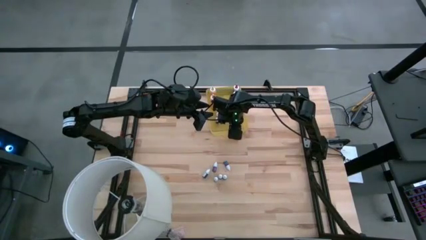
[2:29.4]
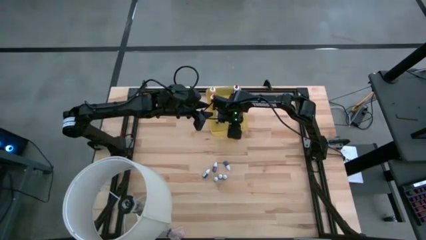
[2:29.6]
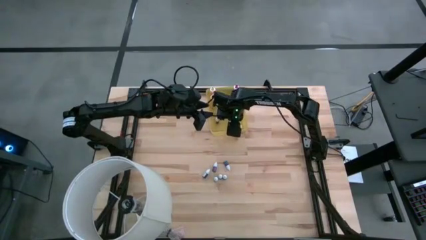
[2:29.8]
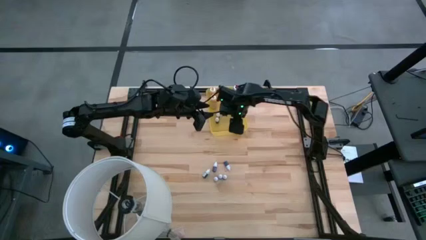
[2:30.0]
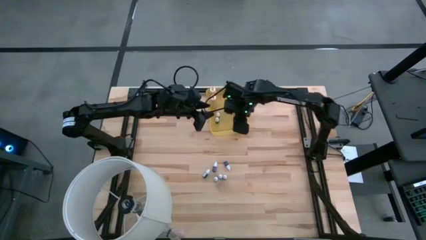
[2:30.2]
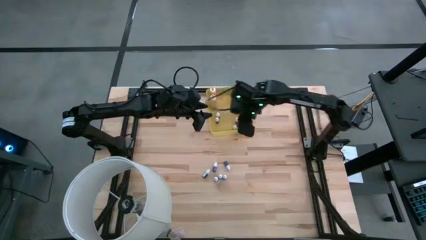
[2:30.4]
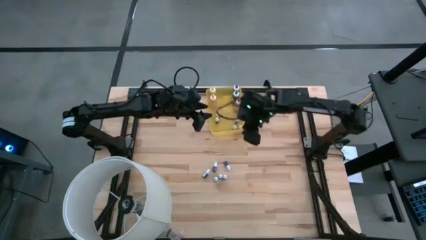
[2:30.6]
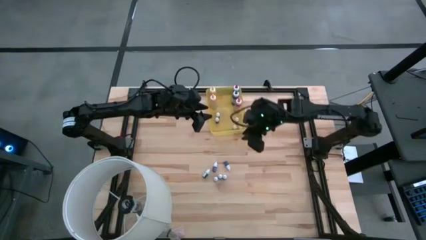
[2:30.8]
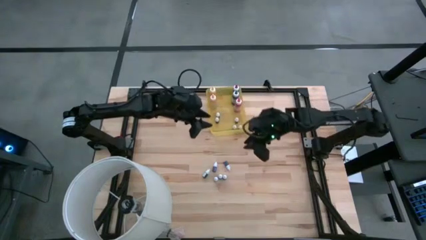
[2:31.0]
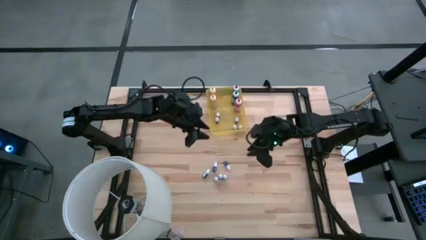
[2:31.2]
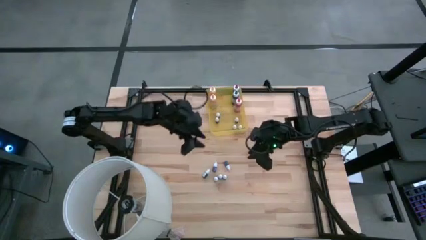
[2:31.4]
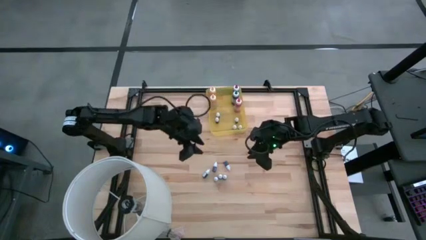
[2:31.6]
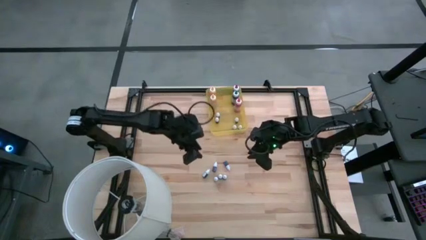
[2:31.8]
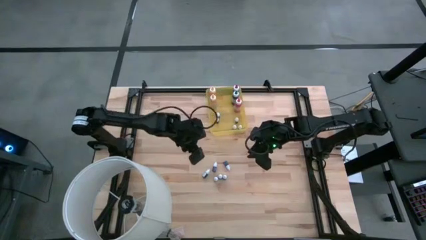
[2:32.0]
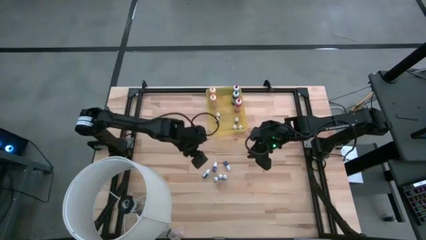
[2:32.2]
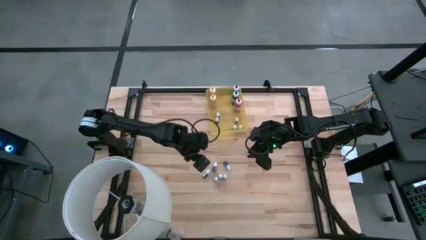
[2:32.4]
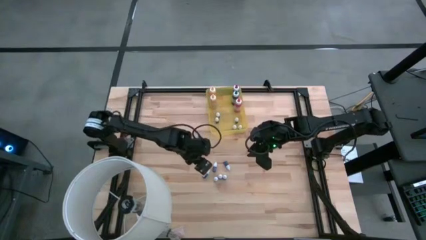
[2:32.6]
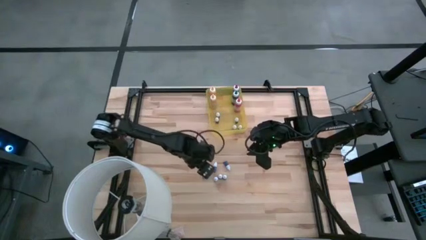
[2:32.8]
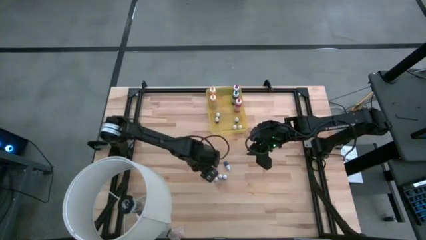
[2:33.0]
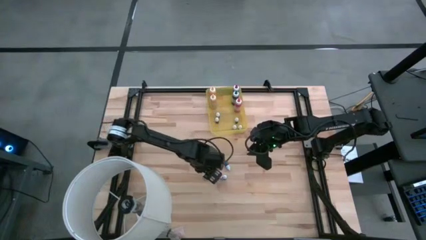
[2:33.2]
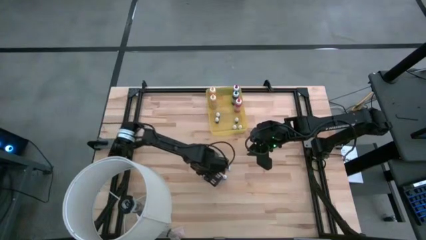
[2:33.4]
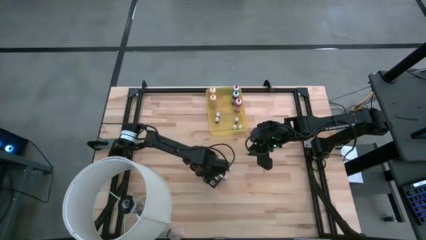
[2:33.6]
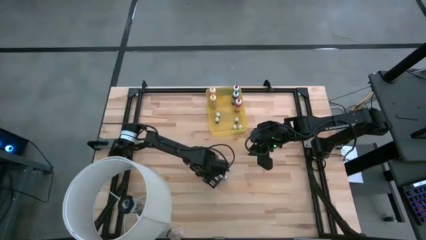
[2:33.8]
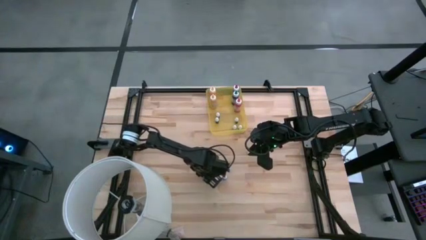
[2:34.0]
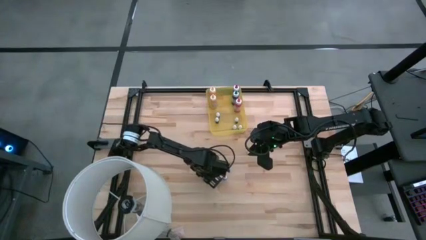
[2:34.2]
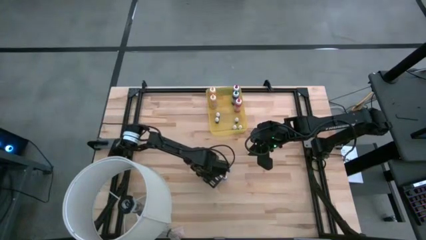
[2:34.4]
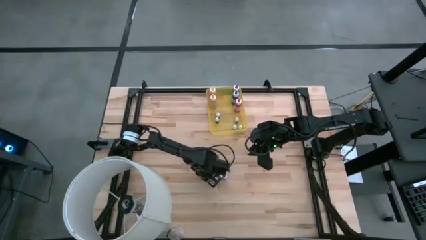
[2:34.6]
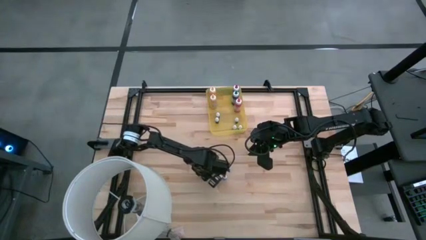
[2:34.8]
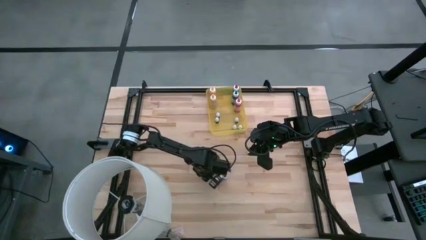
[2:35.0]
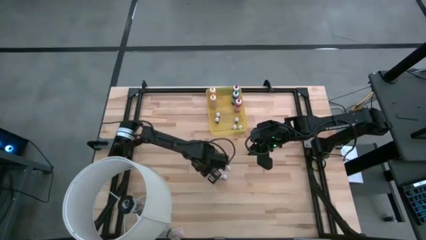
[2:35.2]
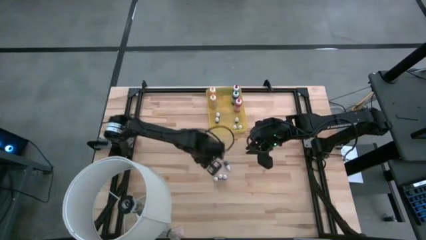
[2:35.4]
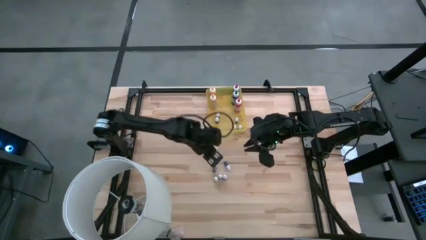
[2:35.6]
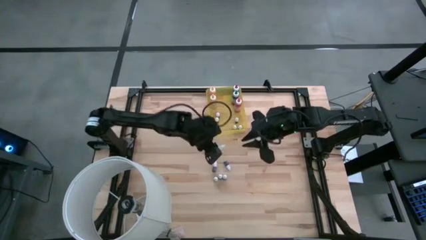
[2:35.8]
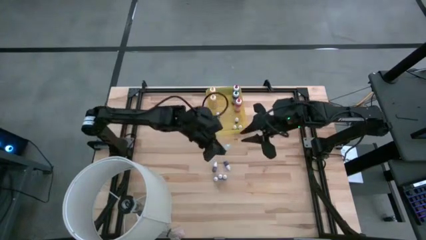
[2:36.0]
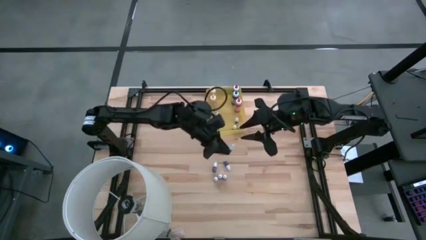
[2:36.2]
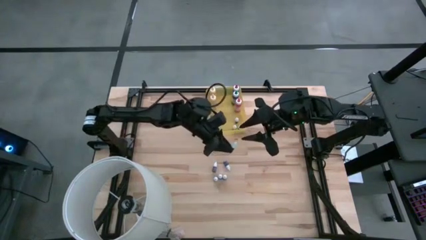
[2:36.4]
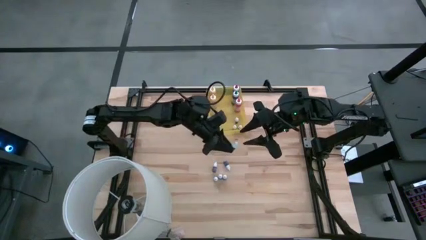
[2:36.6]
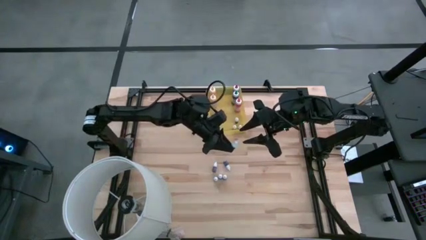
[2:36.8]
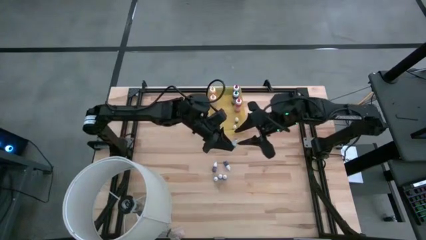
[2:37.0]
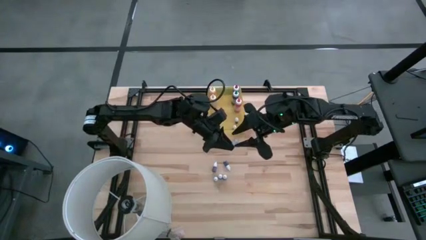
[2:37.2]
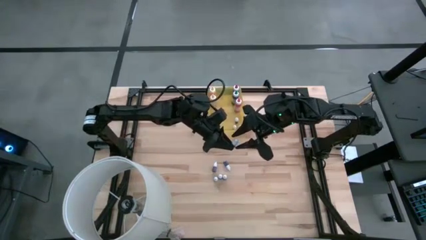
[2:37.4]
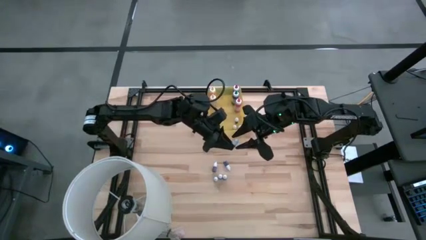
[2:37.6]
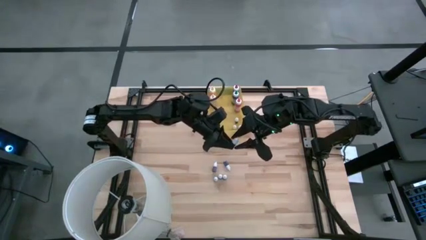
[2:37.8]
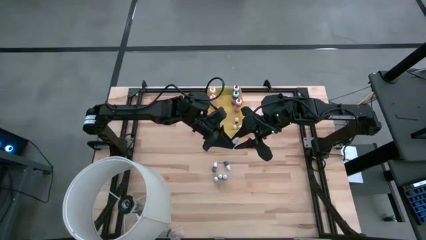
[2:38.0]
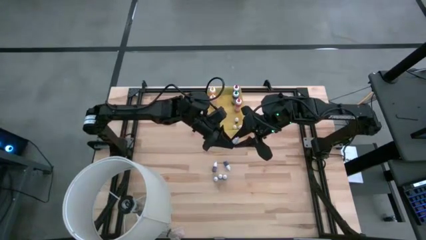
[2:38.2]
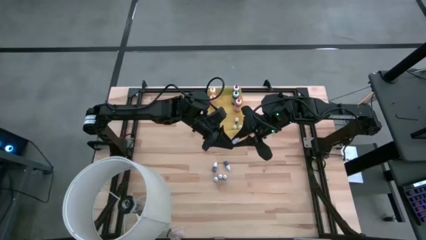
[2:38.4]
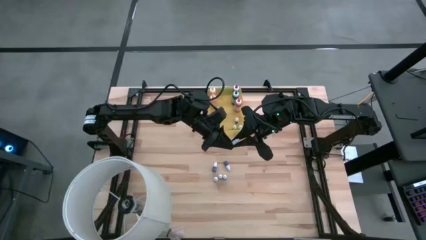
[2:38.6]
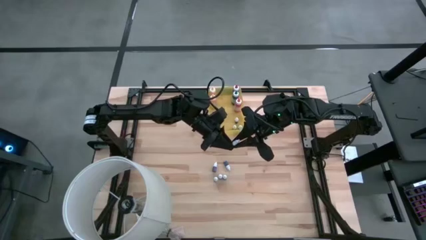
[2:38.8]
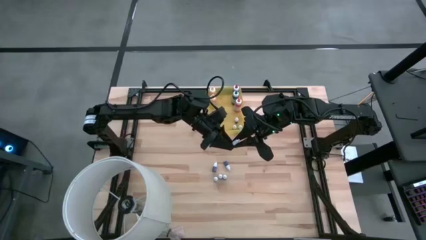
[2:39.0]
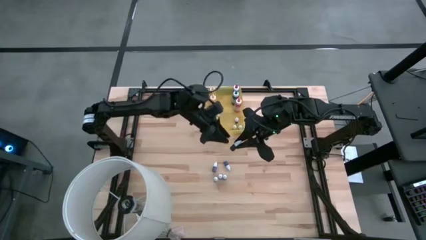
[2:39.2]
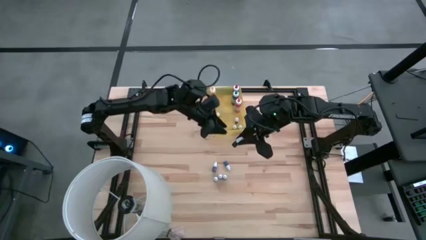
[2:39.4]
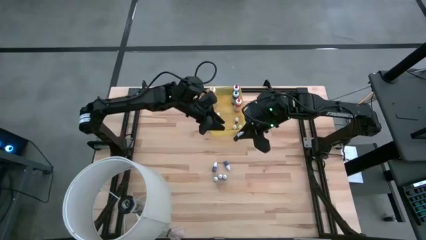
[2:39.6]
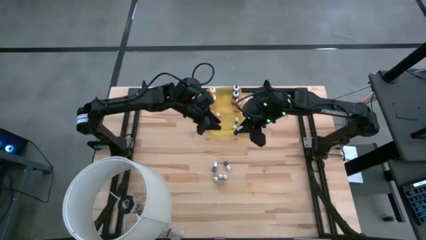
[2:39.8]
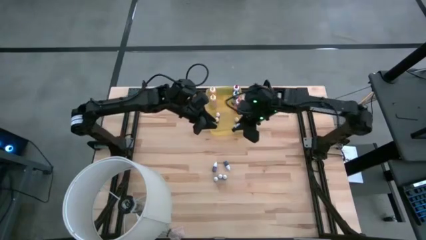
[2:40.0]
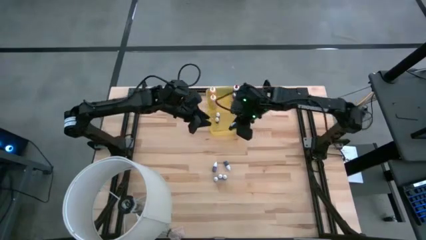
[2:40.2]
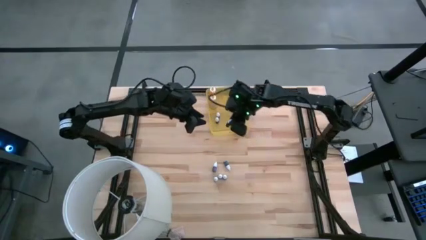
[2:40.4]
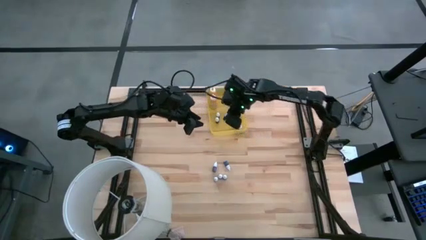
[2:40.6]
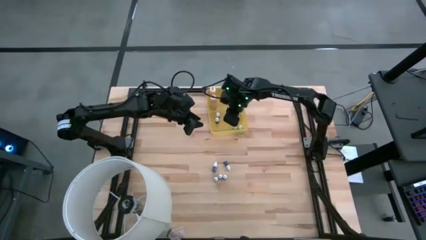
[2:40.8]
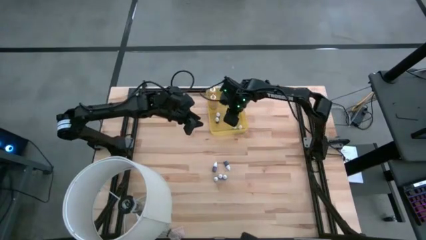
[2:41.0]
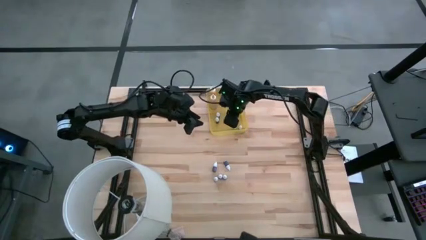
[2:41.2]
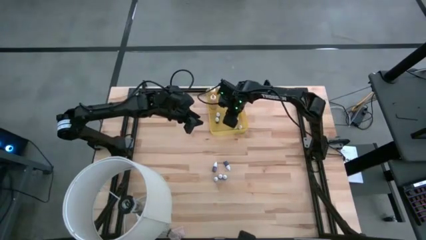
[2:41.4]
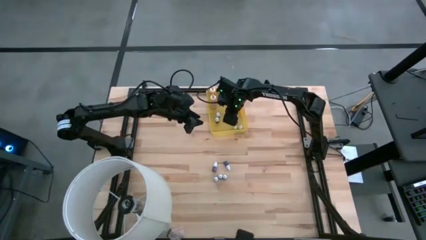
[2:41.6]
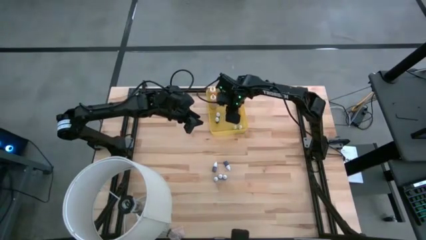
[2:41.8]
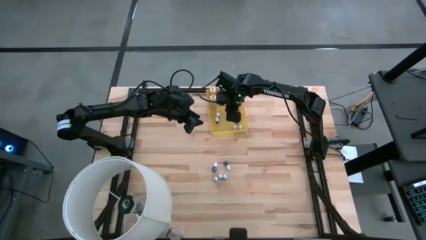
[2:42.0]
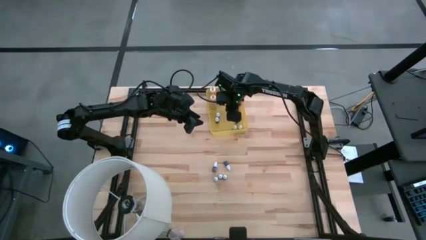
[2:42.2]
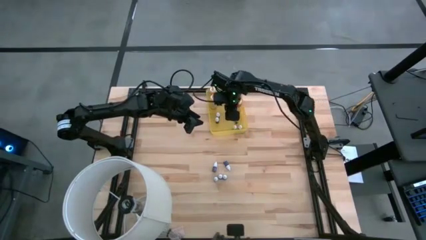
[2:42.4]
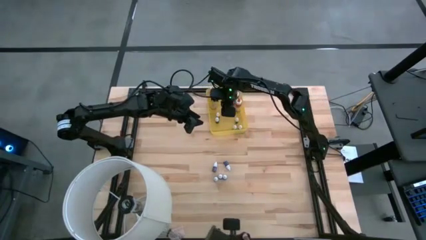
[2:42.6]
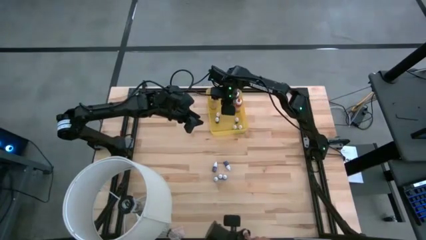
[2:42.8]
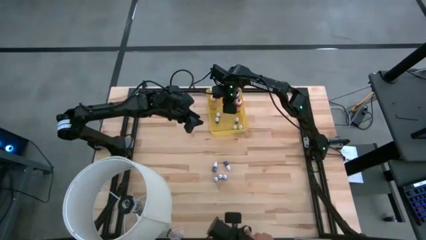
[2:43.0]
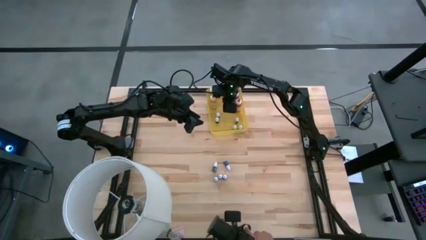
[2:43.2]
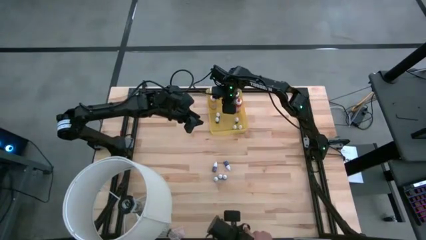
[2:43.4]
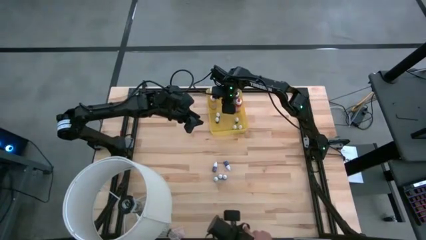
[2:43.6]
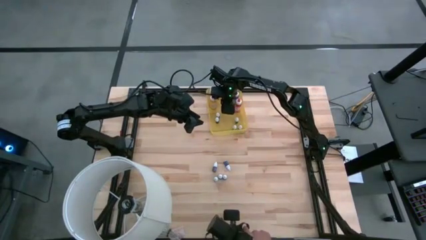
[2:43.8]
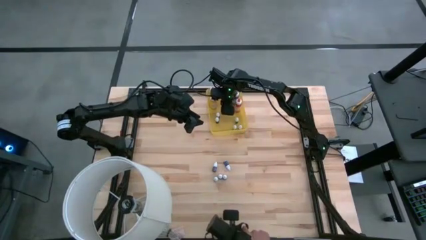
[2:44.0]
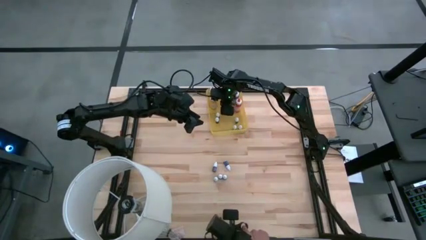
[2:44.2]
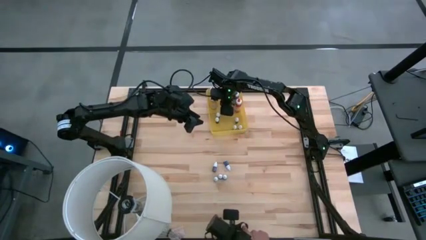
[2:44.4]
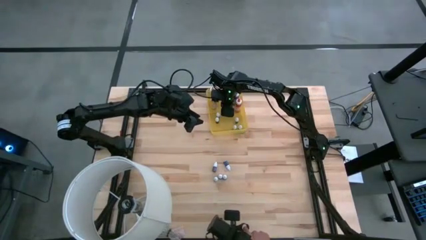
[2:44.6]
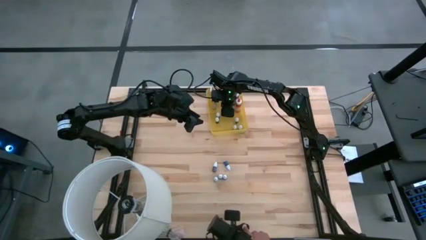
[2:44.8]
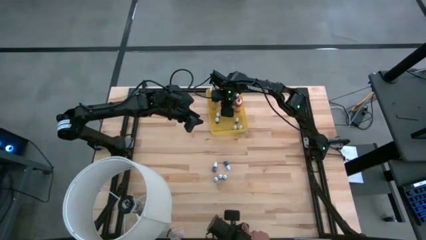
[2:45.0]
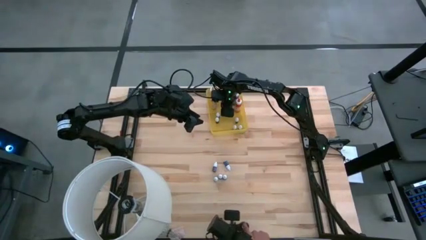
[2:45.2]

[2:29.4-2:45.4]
Task: Pick & Place food coloring
Put the small green food coloring bottle into the yellow bin
